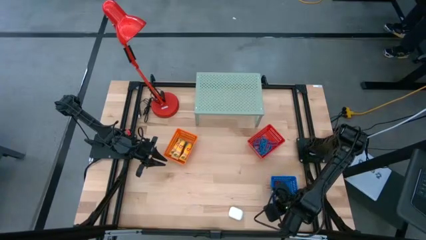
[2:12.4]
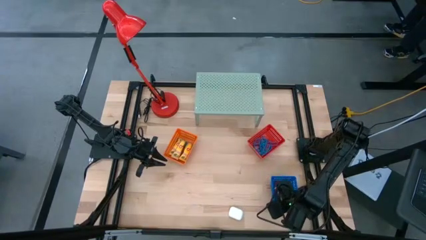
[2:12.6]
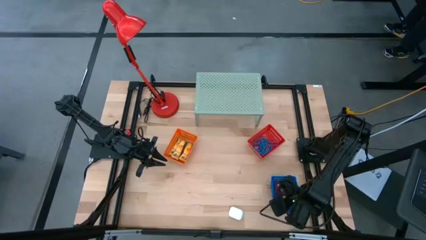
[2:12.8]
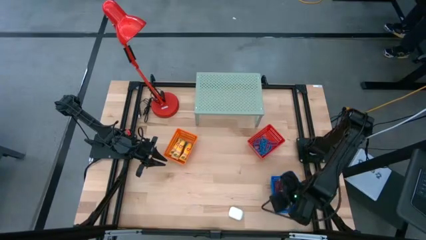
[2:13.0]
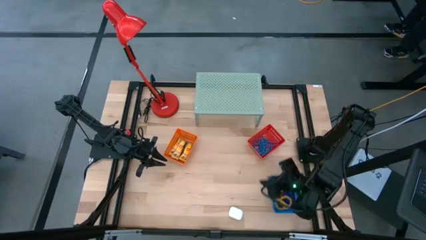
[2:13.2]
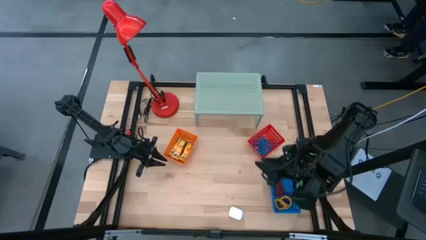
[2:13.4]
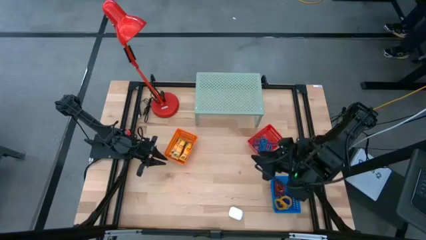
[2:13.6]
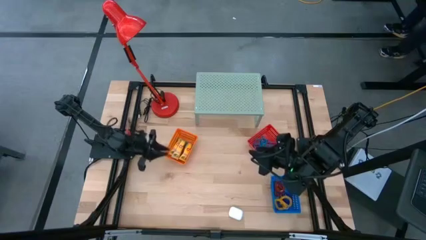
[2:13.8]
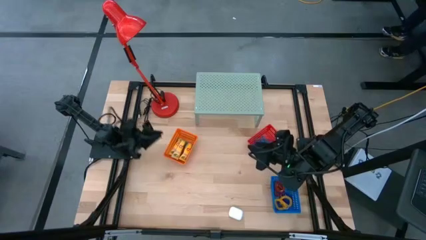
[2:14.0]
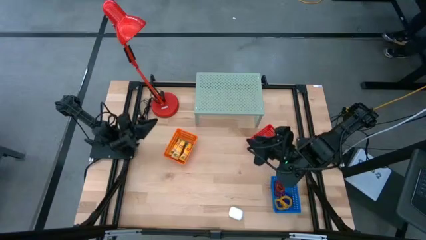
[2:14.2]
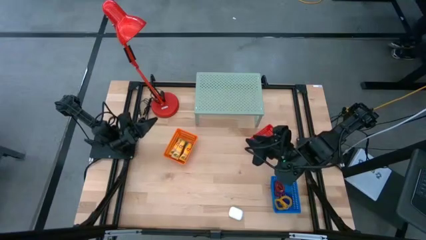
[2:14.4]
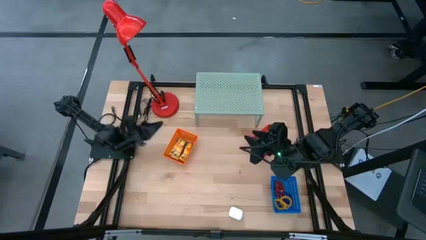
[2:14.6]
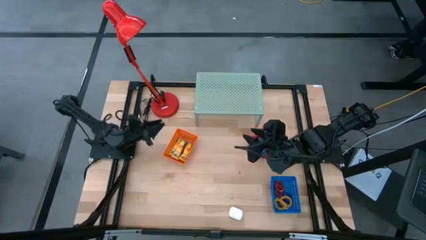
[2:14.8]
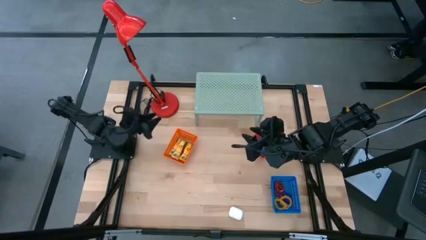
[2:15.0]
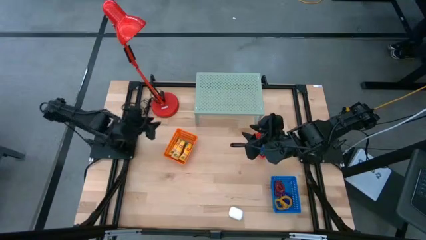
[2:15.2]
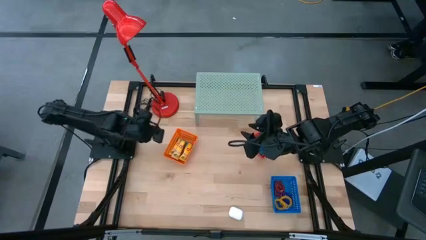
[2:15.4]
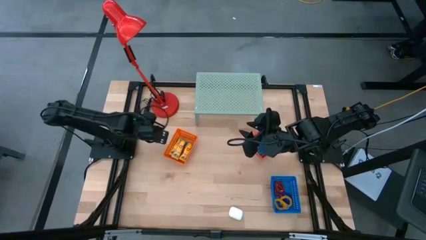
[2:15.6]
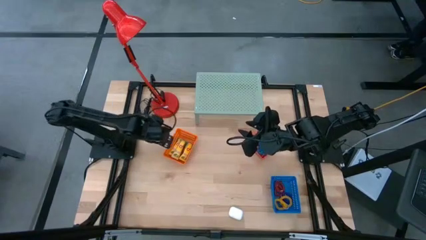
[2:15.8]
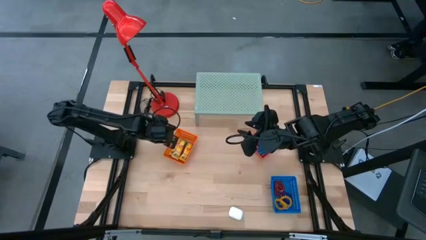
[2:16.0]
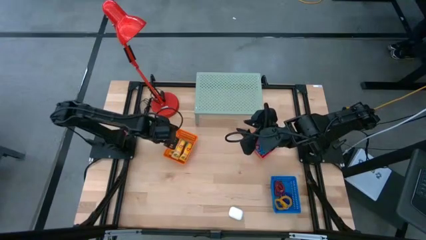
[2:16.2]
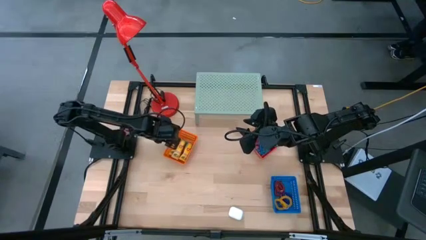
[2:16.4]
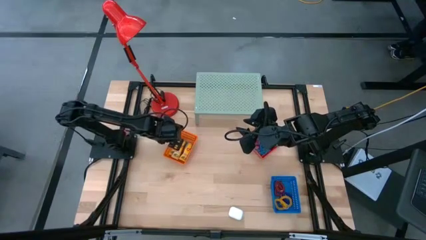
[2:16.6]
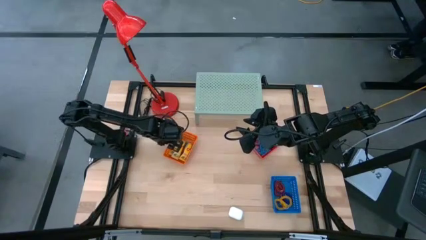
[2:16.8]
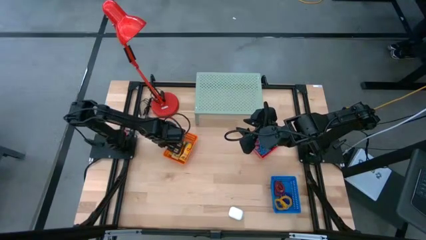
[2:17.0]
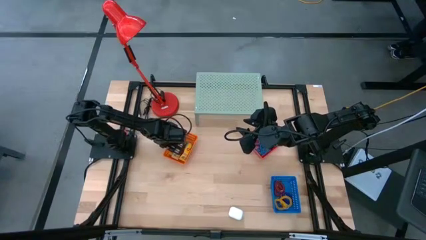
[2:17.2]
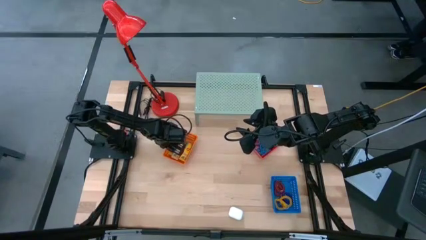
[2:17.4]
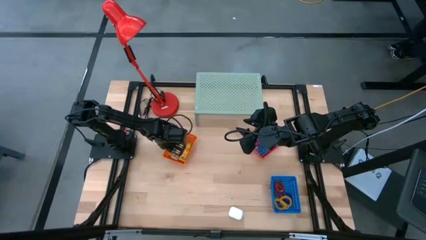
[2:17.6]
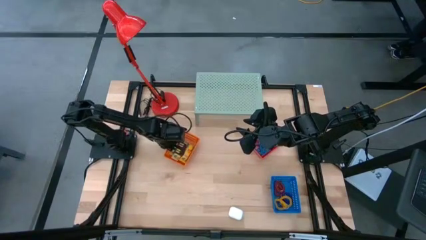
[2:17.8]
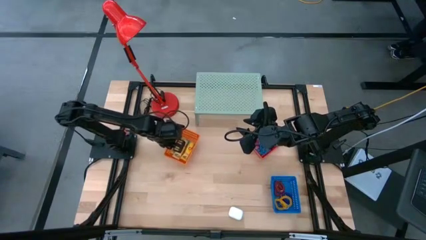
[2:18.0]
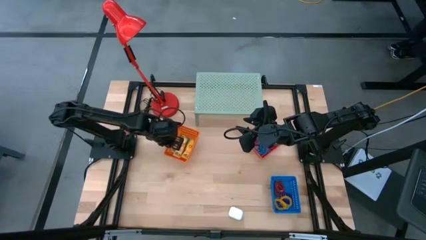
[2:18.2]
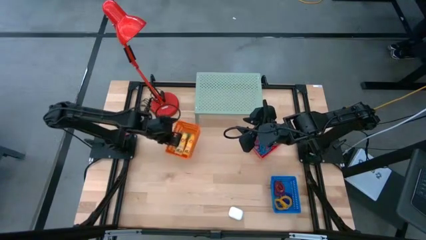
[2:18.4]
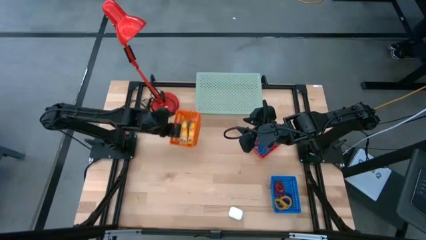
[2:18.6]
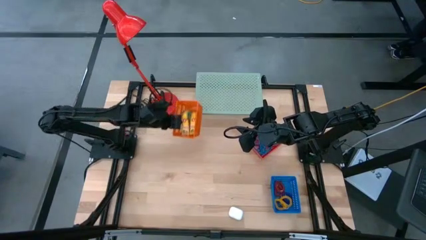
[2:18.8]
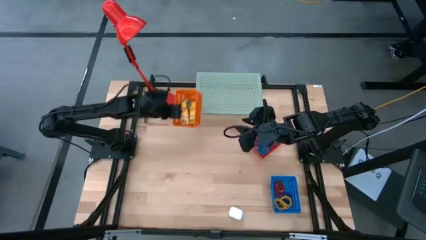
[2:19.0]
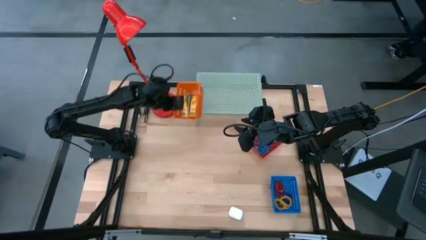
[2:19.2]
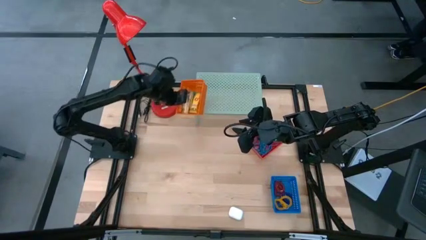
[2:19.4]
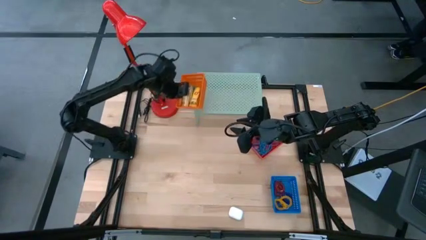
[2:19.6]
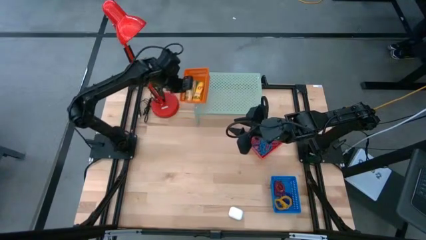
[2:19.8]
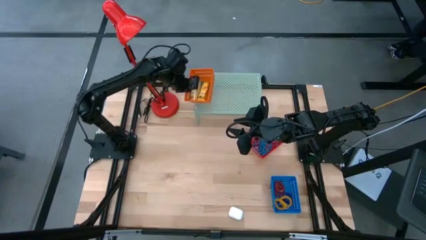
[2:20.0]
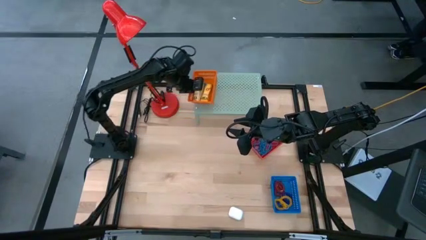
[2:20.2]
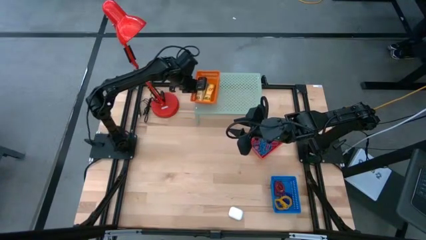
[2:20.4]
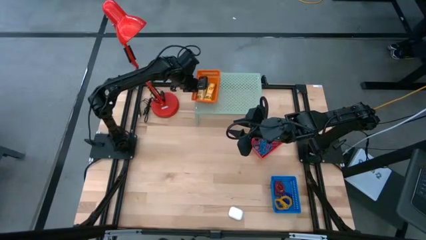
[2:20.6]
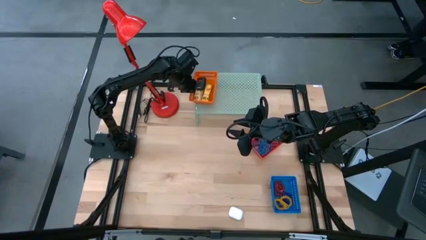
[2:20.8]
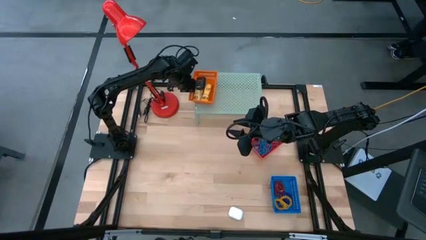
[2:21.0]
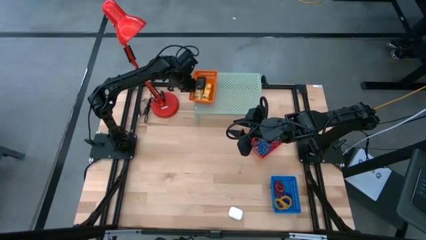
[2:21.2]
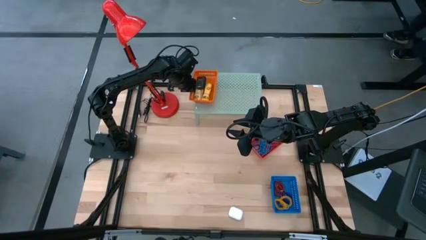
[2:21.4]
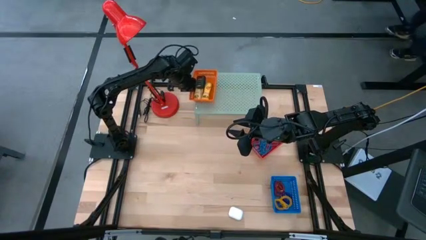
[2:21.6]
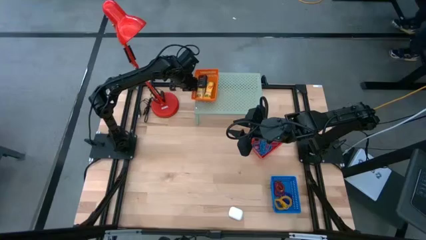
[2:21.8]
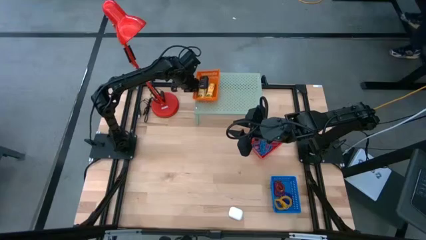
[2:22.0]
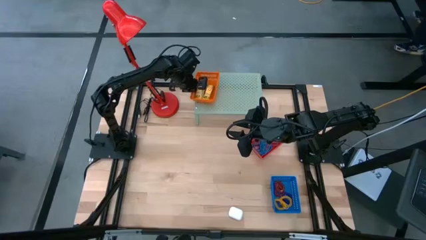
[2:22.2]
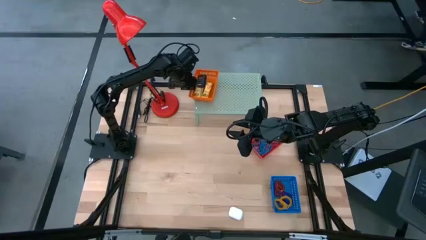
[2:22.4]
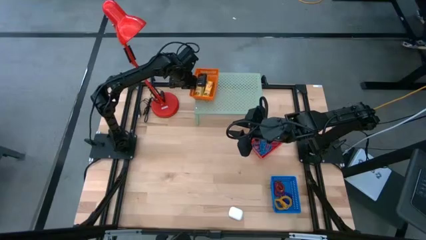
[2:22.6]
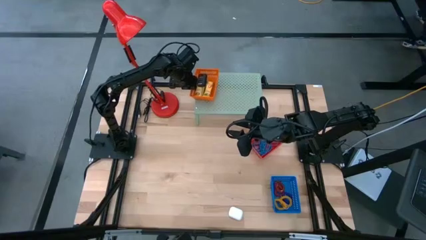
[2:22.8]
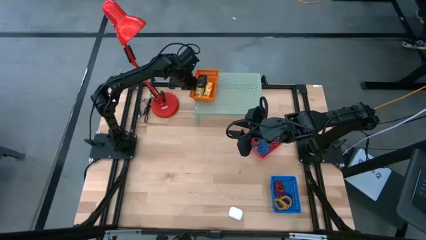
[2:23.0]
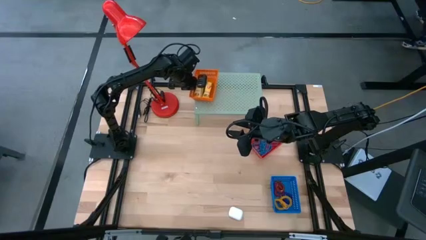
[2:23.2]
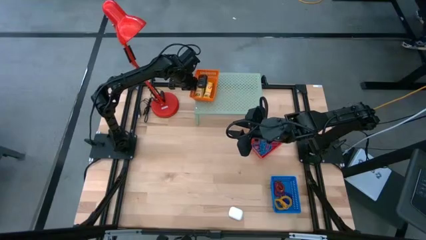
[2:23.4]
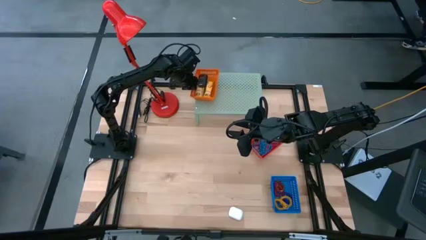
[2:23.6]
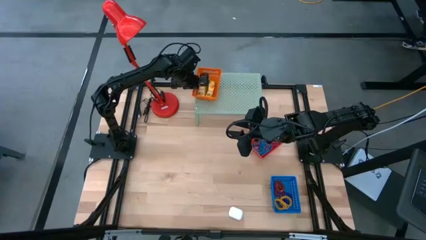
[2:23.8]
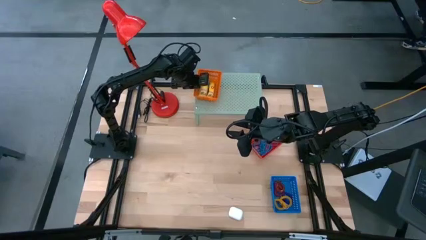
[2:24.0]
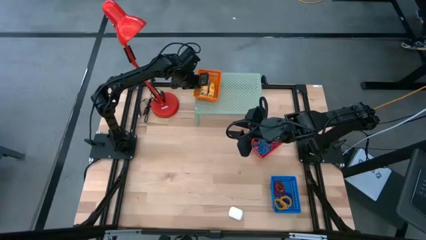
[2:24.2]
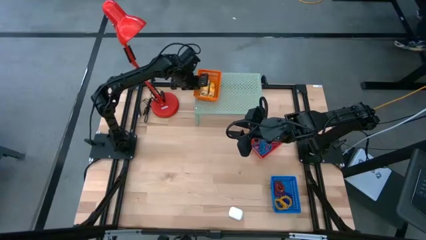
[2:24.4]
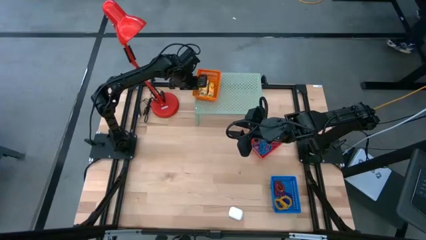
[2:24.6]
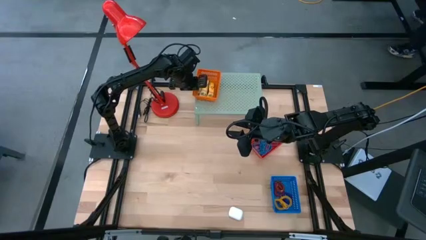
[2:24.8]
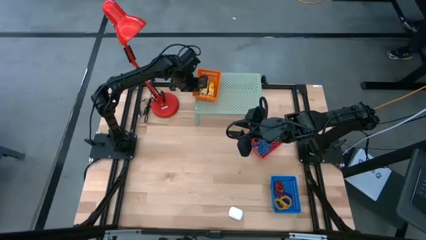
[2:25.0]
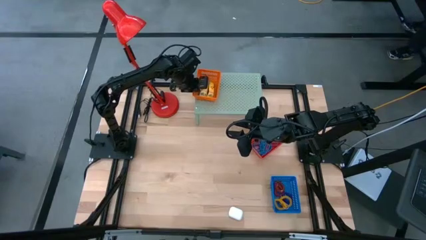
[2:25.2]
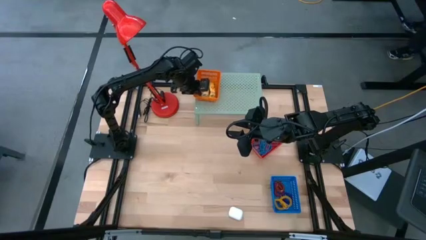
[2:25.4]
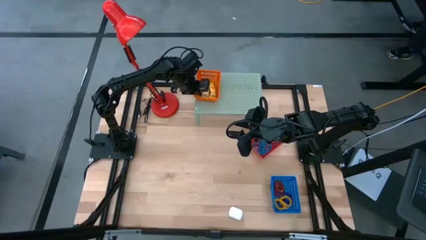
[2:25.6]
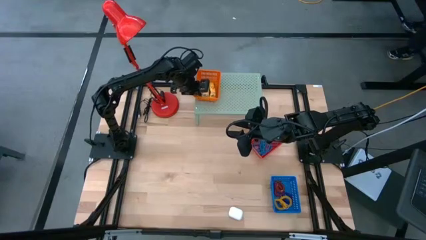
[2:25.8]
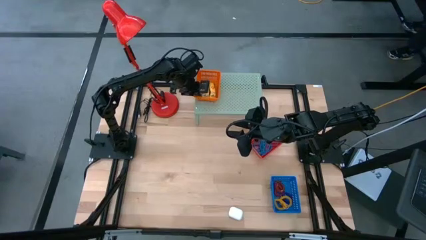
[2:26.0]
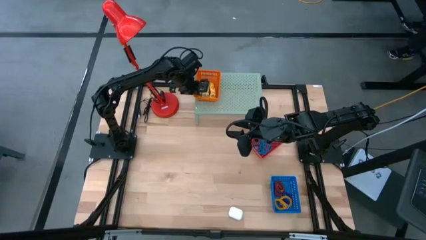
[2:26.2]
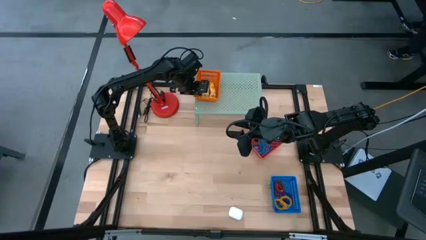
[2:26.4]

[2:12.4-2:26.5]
Task: Pick & Place Office Desk Supplies
Put the orange plastic tray on the shelf

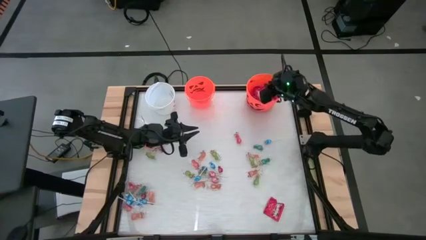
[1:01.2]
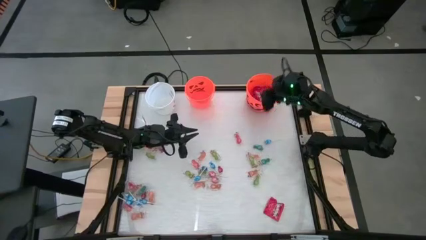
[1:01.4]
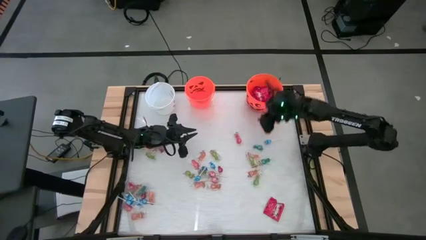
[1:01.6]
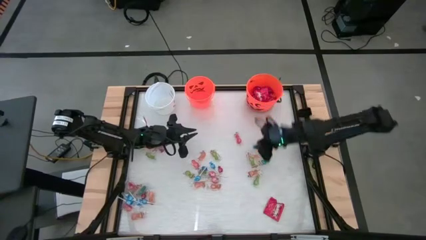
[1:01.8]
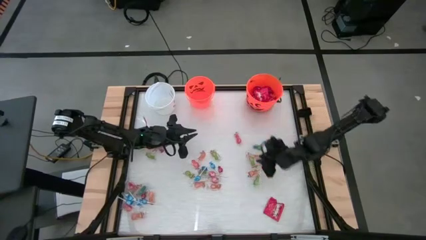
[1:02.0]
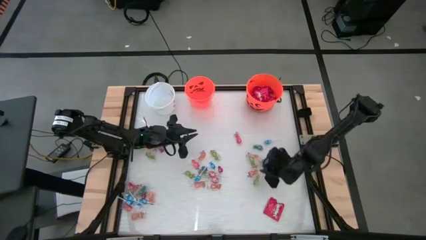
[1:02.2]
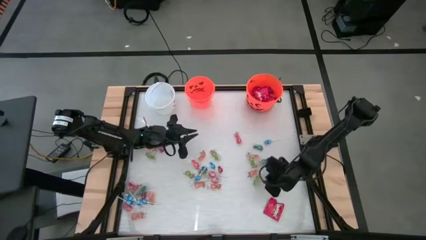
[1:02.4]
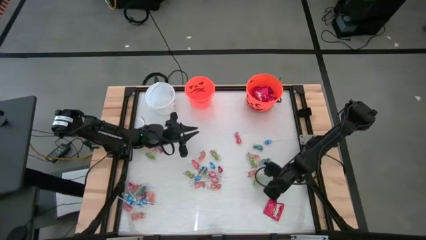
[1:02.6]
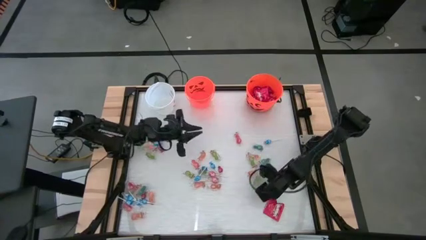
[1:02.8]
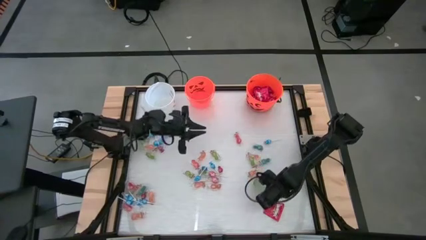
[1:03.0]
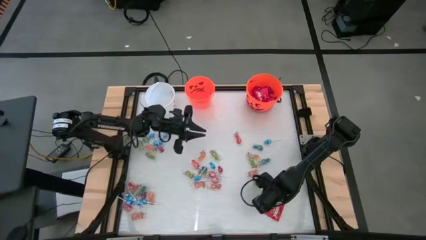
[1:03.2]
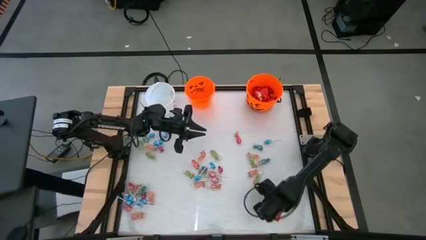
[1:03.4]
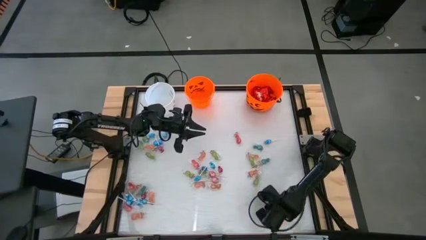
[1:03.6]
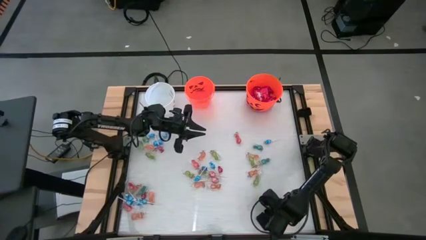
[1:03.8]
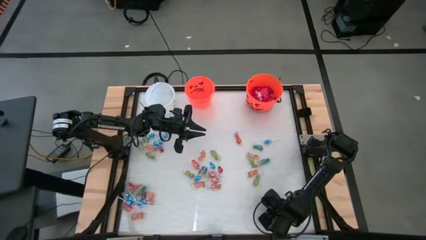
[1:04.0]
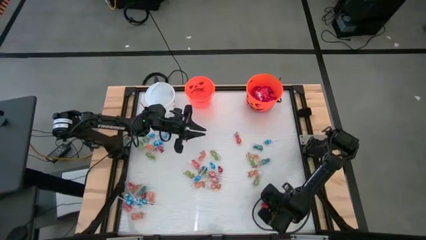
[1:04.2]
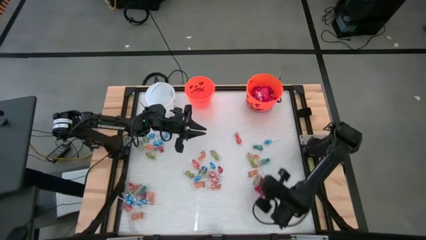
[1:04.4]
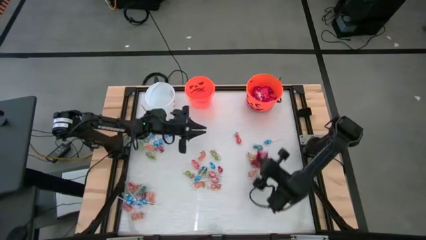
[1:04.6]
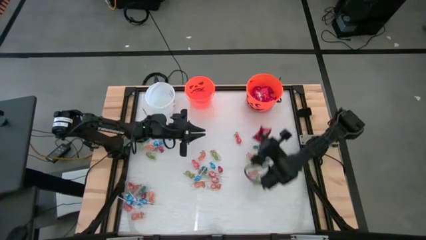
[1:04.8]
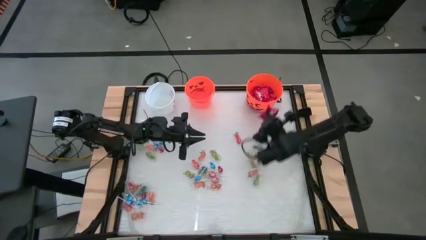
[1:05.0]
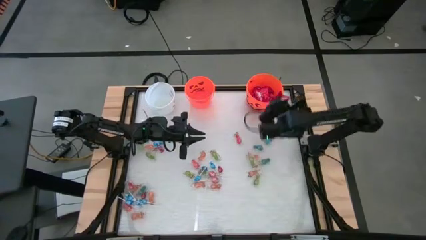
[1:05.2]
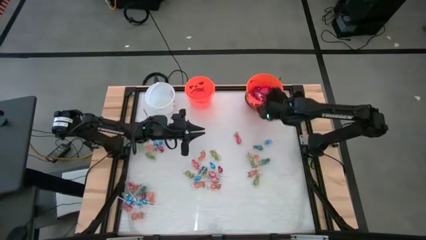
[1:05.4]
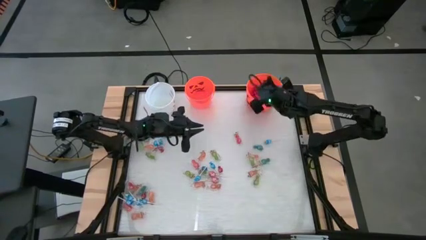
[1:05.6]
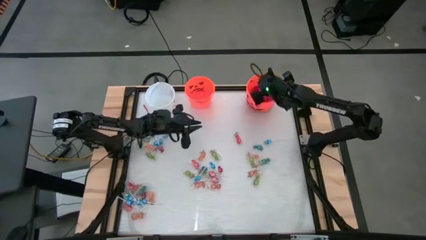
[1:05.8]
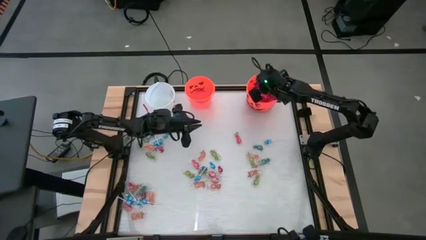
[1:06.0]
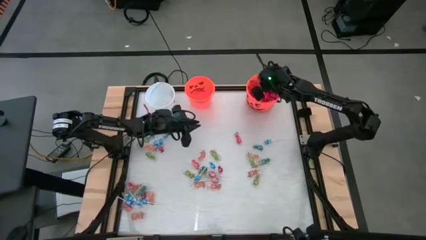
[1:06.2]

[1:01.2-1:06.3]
Task: Sort candy by brand, put in halloween buckets
Put the red candy into the right orange bucket
